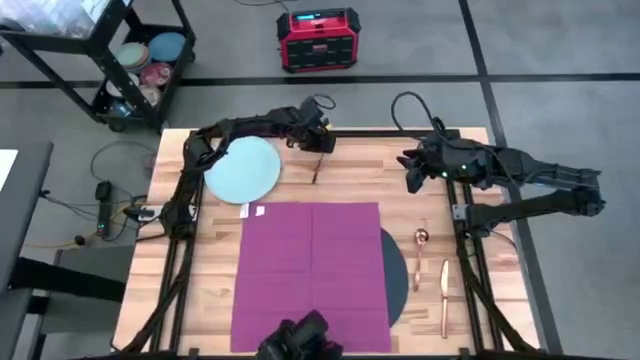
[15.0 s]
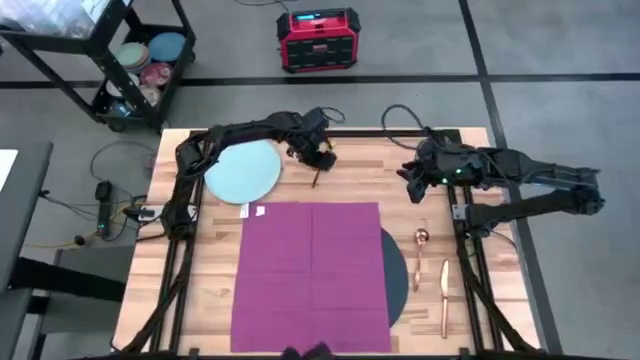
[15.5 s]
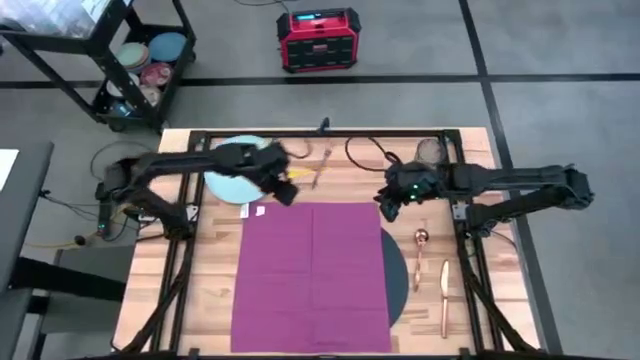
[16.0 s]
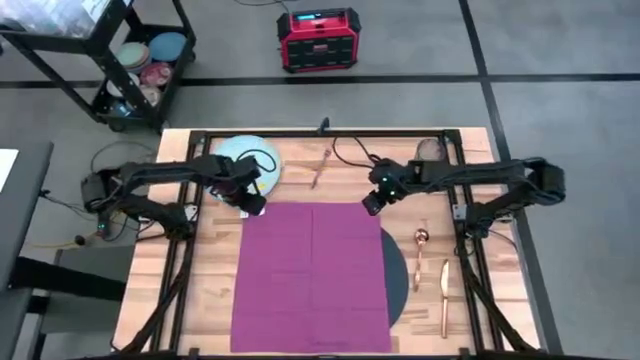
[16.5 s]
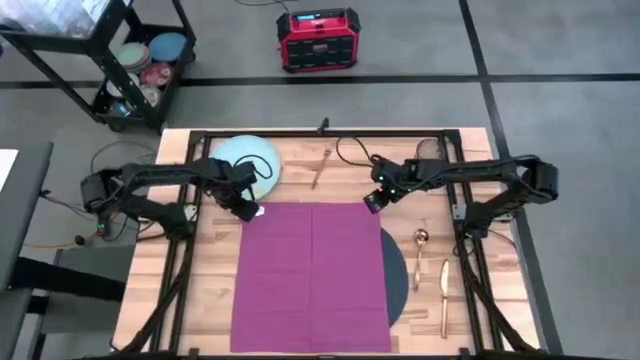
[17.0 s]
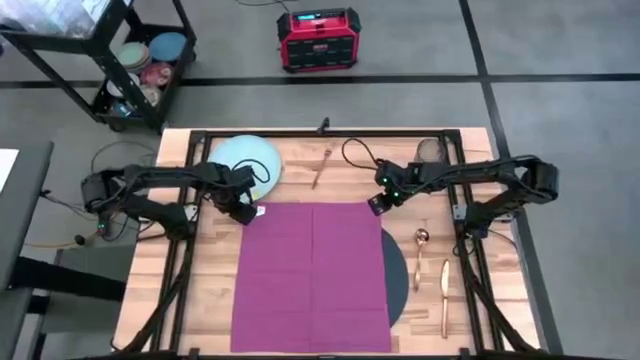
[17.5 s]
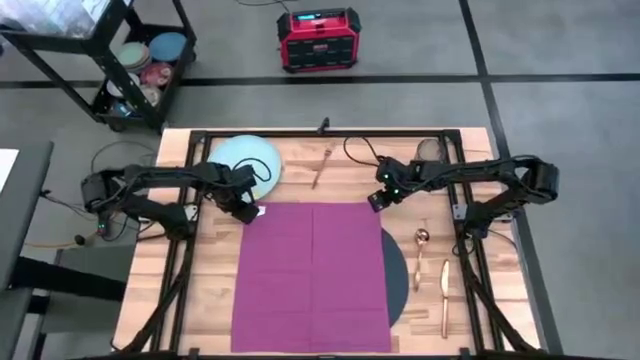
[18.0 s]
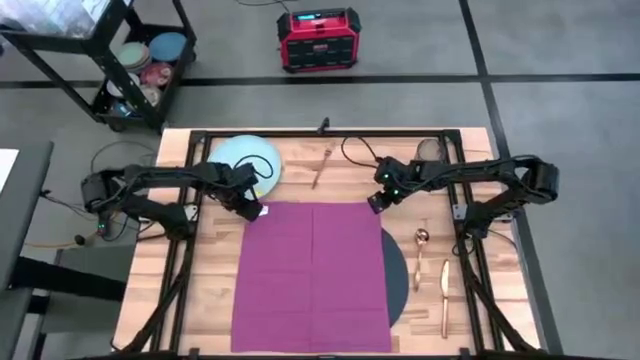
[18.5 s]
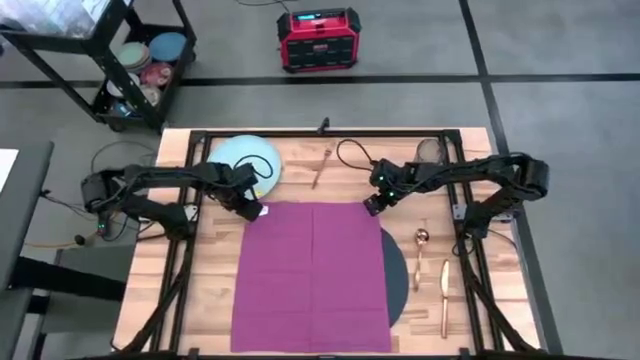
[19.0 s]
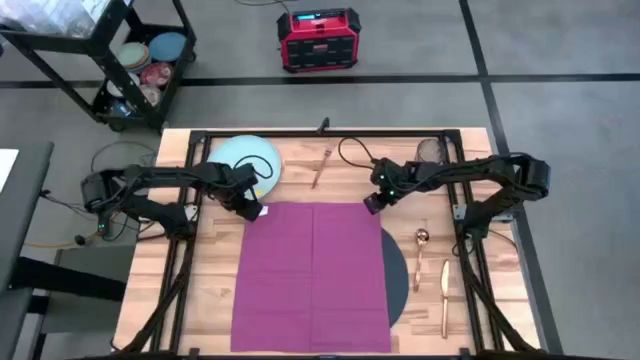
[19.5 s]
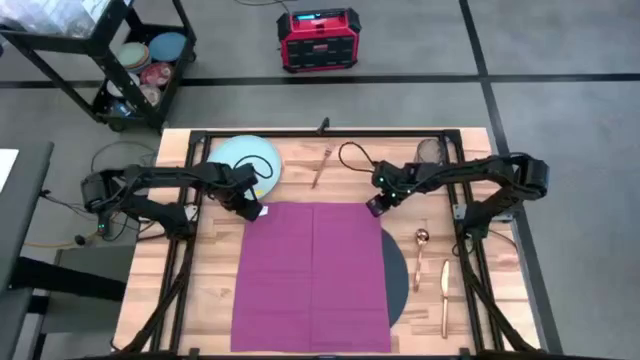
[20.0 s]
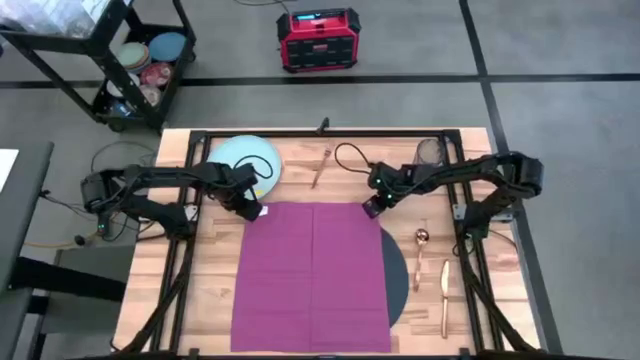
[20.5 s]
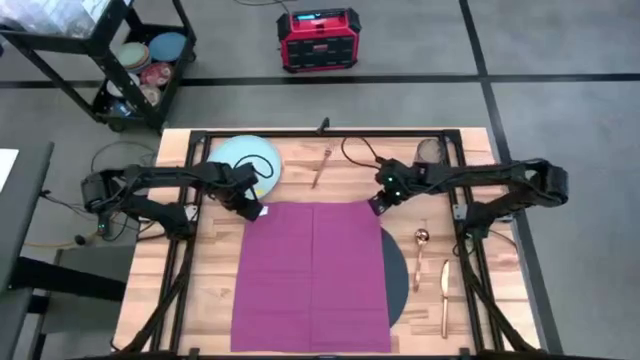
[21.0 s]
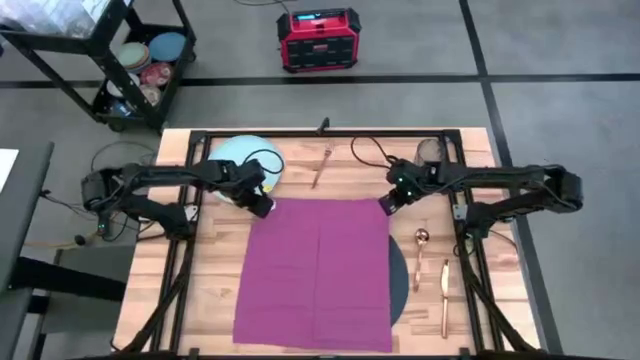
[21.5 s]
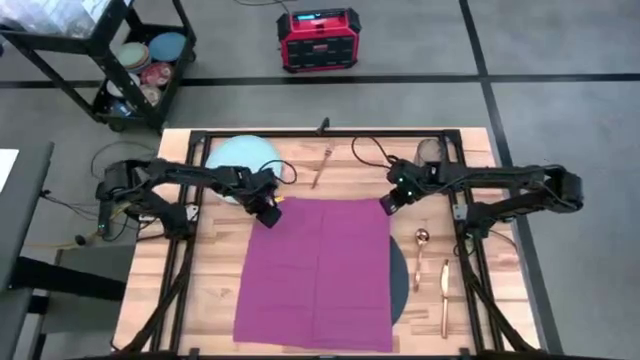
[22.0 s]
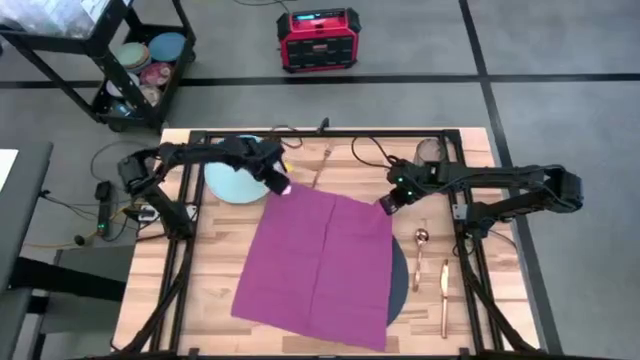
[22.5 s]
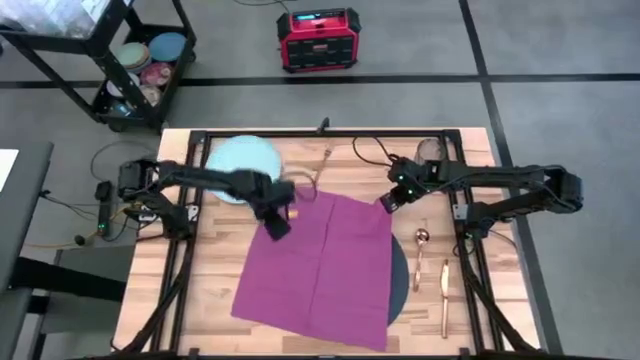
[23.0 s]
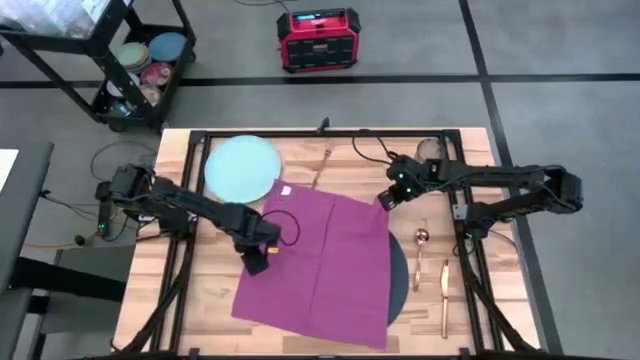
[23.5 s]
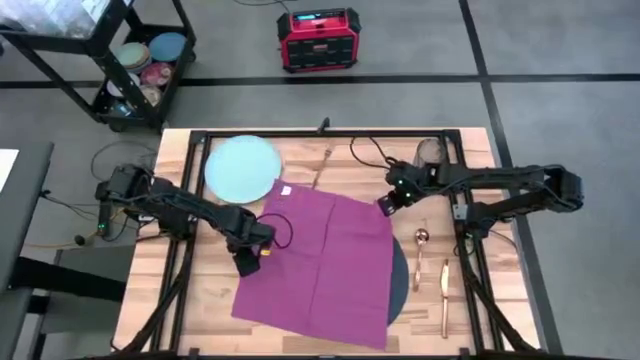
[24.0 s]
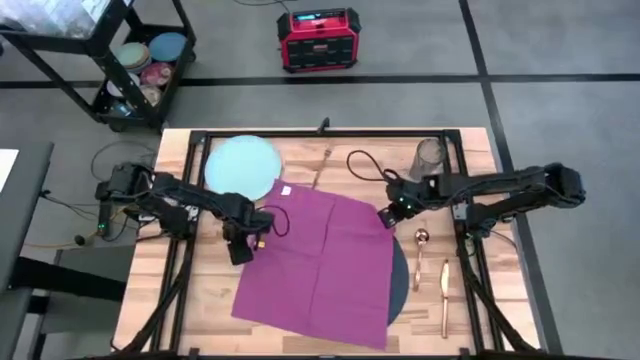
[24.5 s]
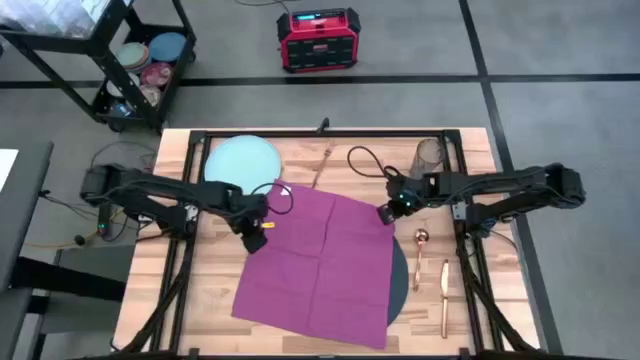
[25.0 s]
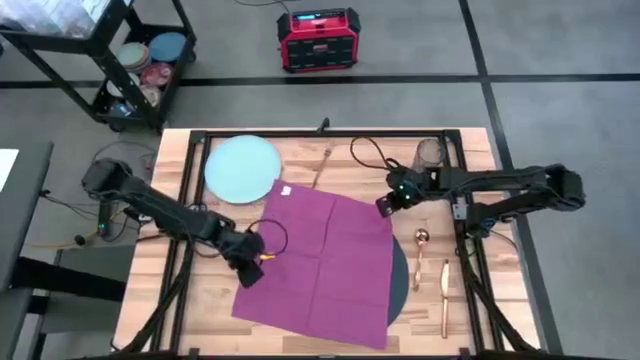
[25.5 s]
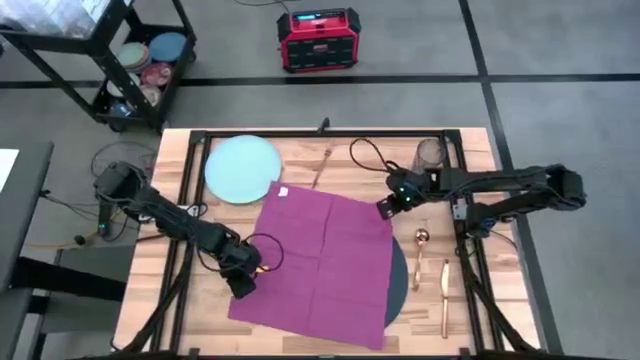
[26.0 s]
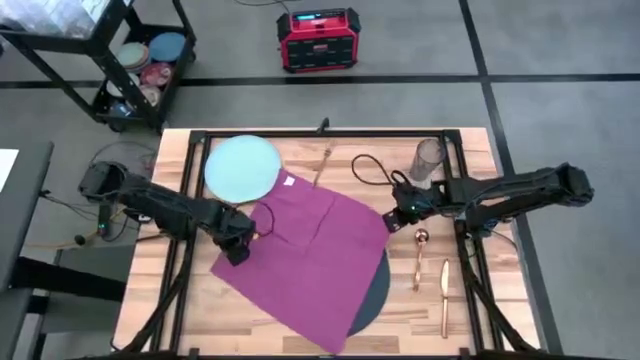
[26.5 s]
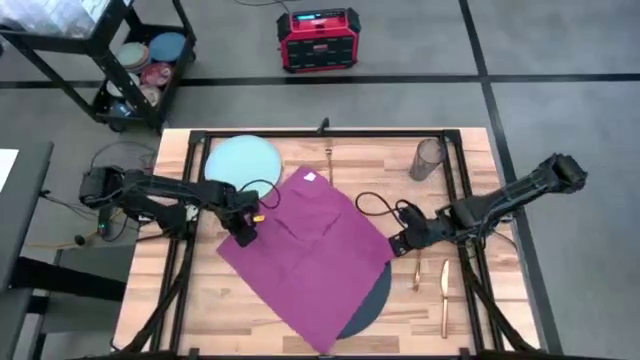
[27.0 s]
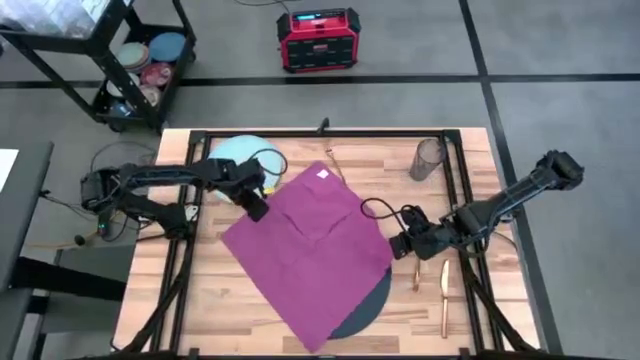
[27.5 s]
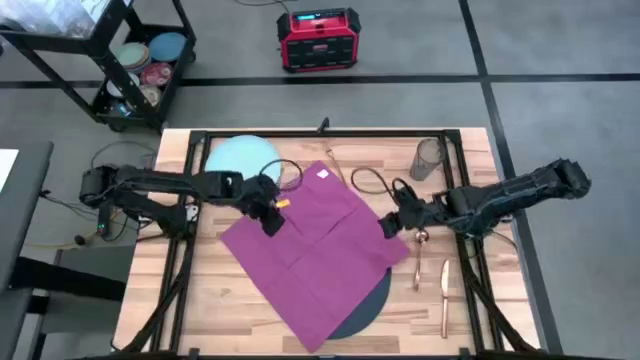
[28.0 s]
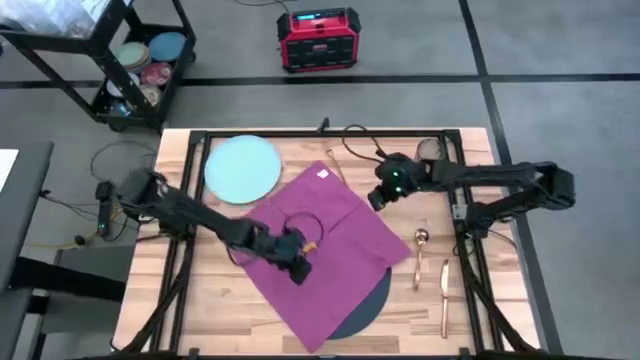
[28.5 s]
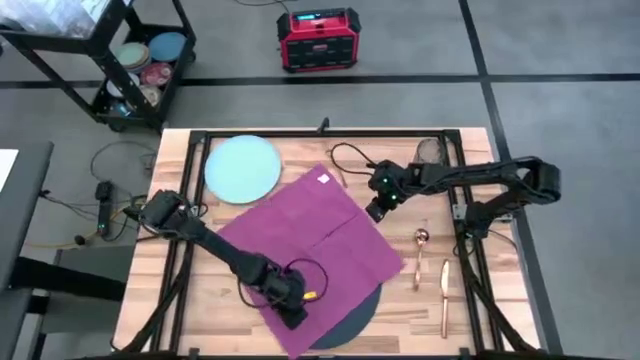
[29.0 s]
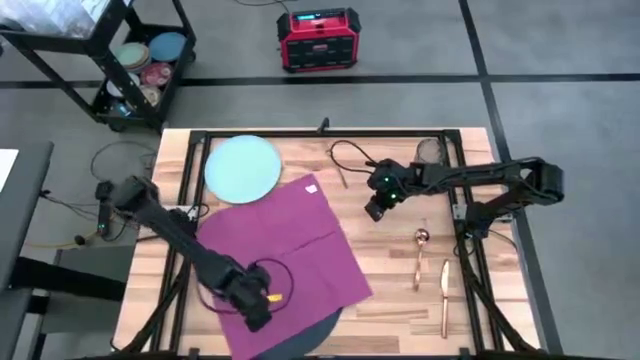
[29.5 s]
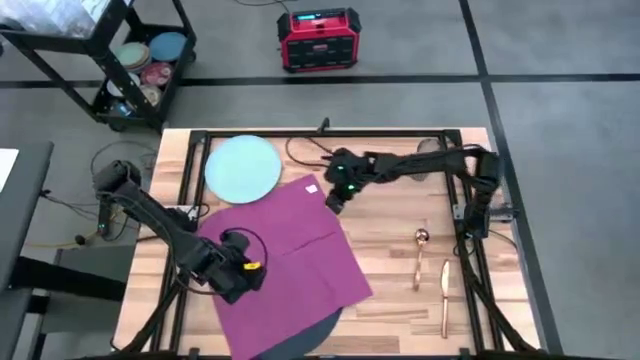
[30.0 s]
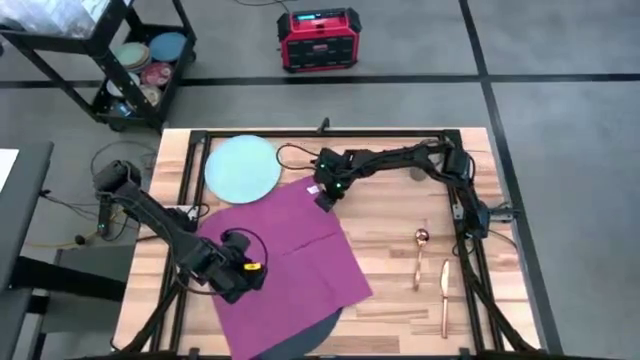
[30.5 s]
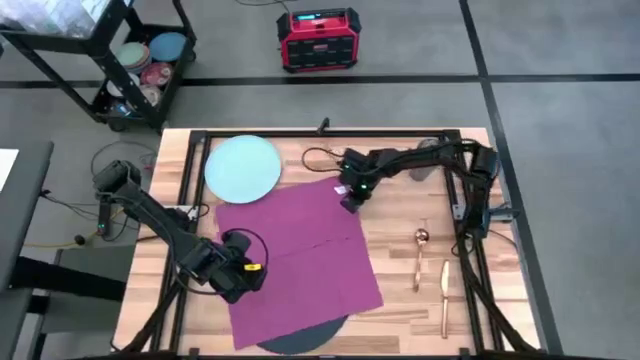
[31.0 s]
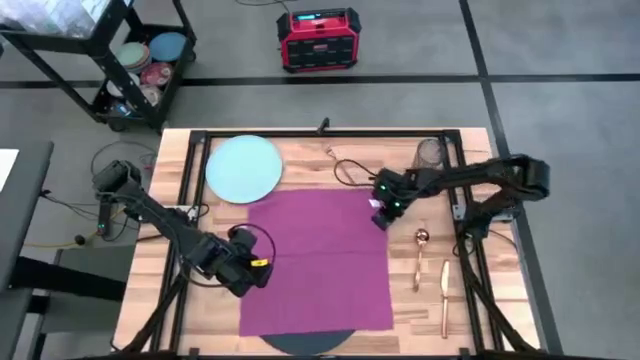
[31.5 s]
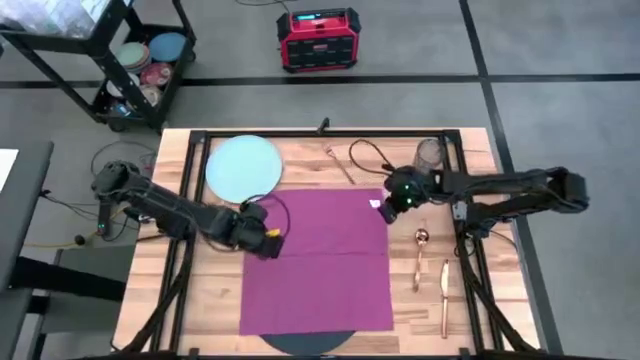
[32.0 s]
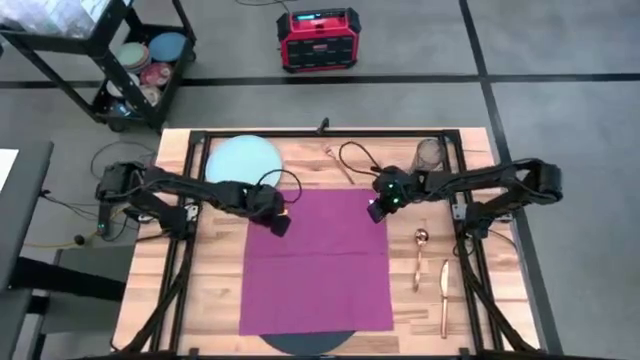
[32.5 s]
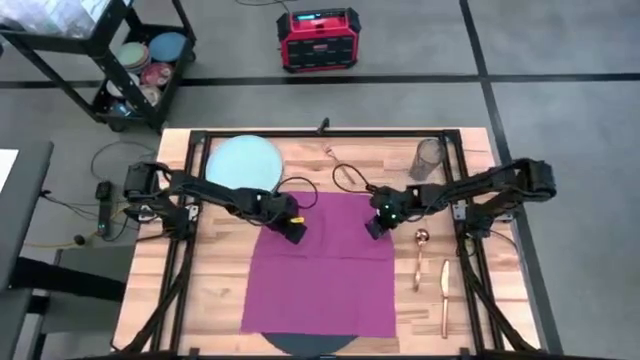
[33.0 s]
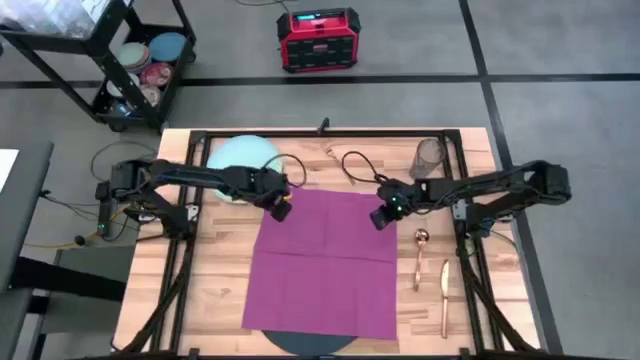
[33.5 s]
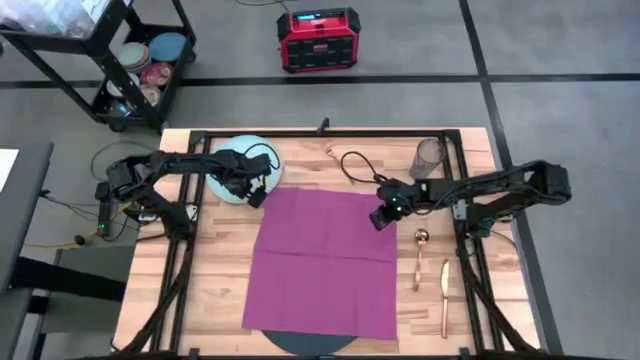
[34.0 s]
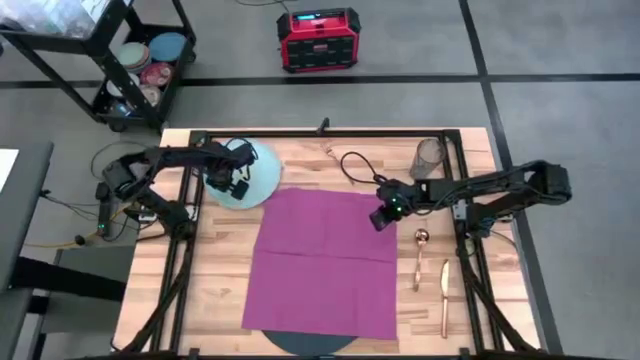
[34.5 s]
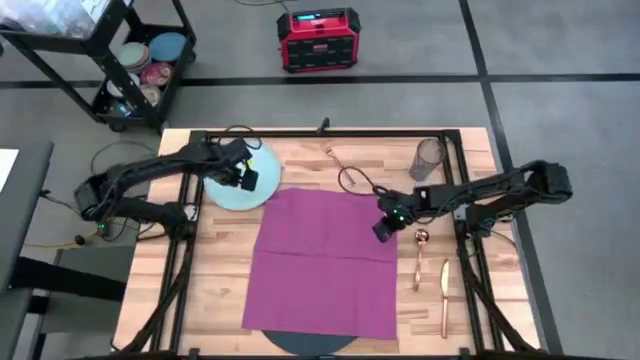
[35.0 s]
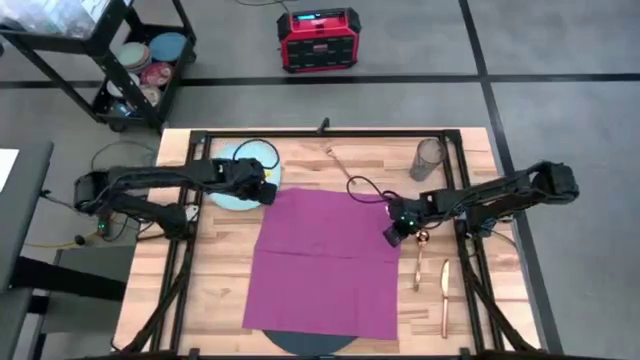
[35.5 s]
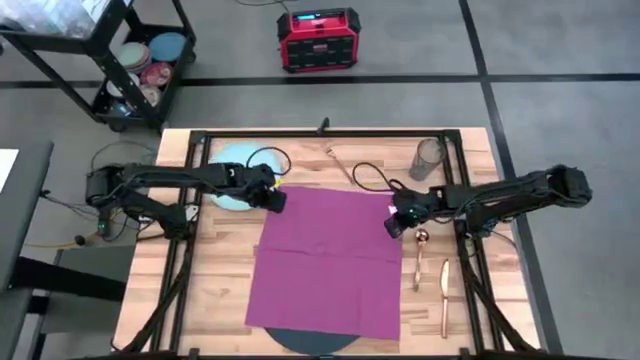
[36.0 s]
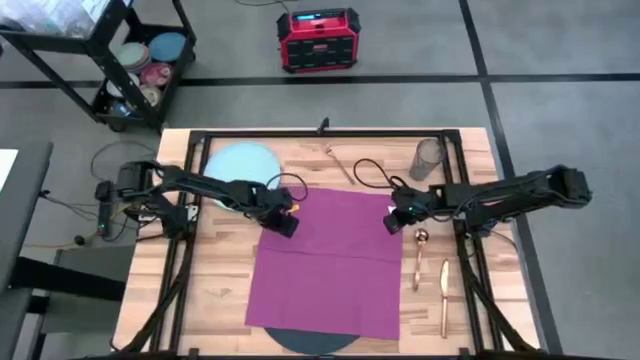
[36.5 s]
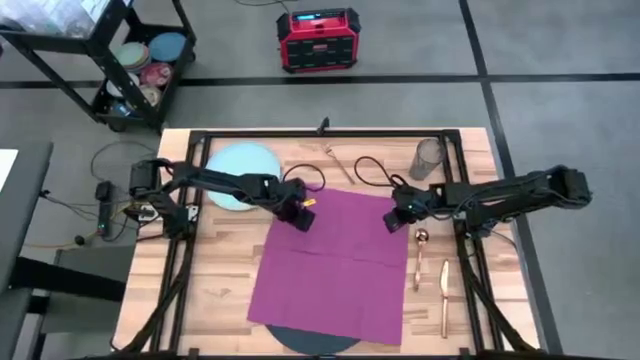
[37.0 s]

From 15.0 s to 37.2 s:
Task: Set table place
Fold the pink table napkin
